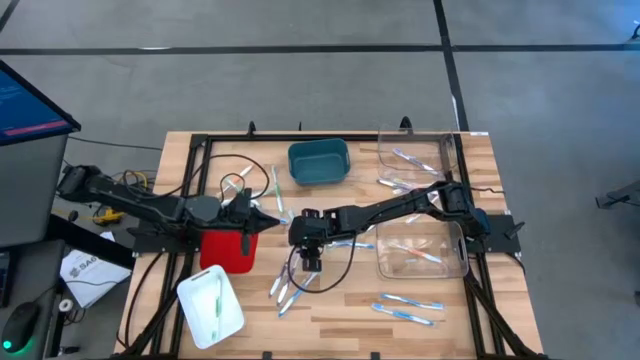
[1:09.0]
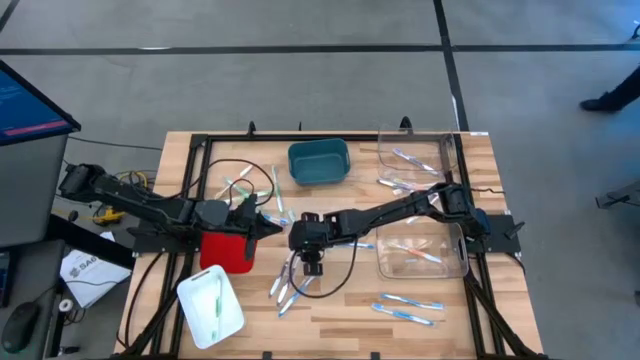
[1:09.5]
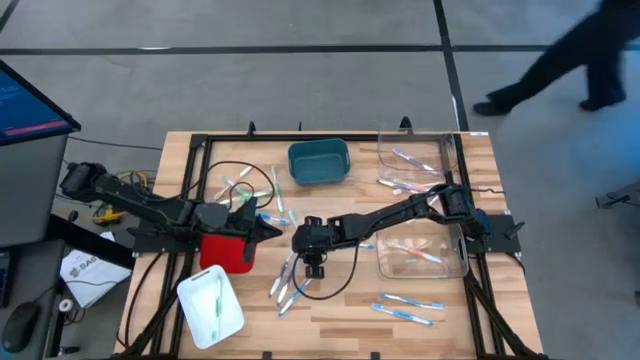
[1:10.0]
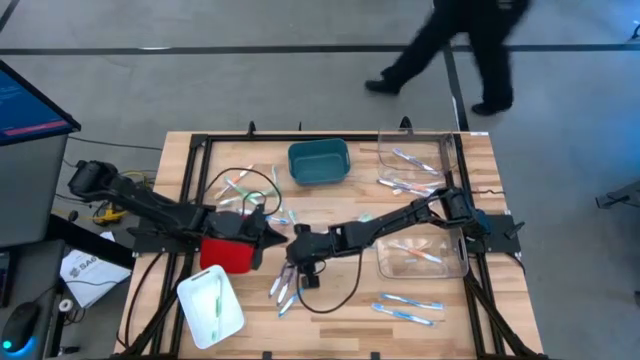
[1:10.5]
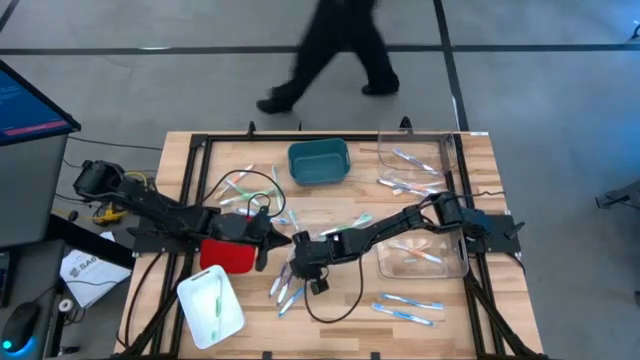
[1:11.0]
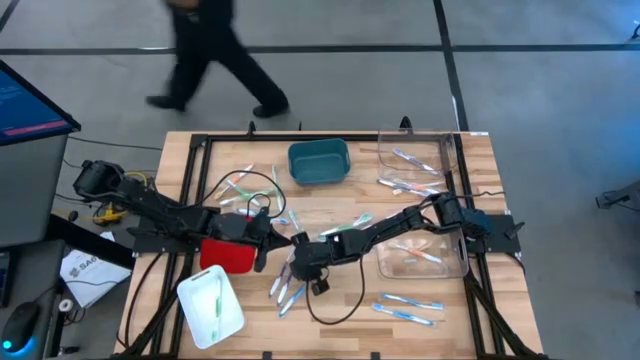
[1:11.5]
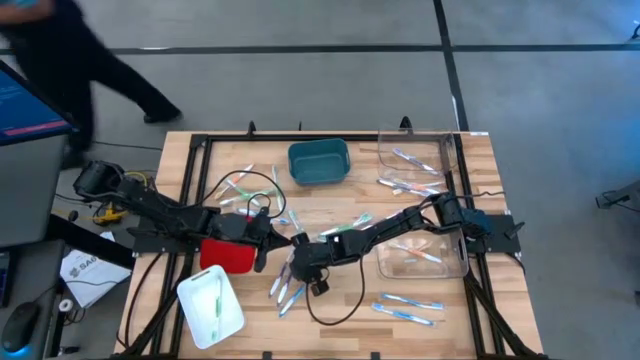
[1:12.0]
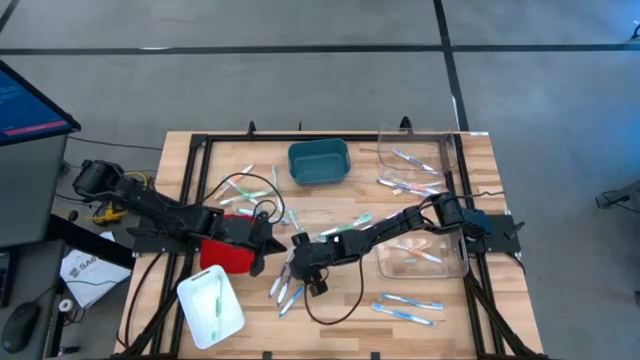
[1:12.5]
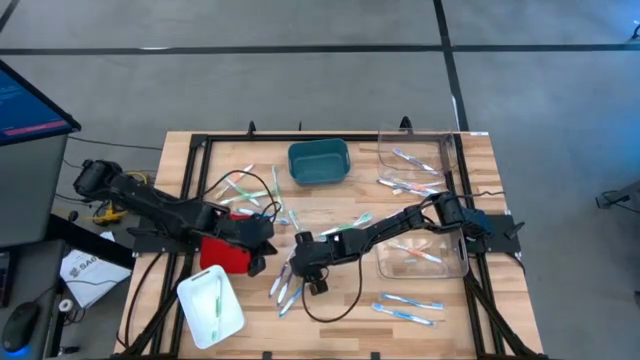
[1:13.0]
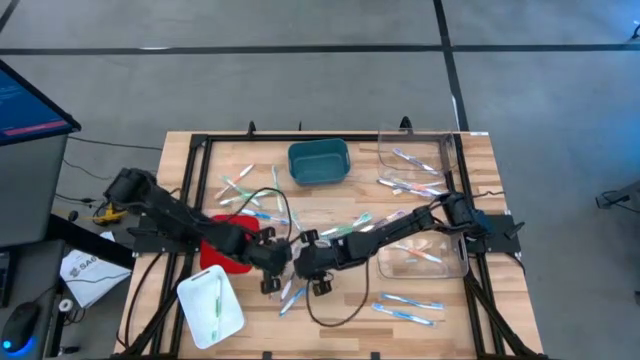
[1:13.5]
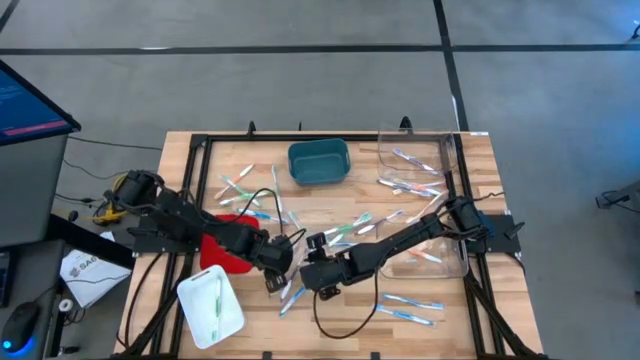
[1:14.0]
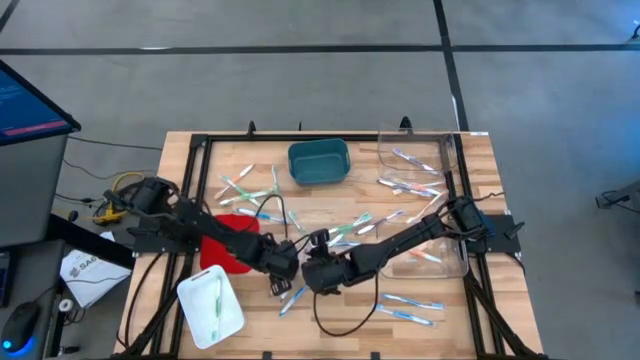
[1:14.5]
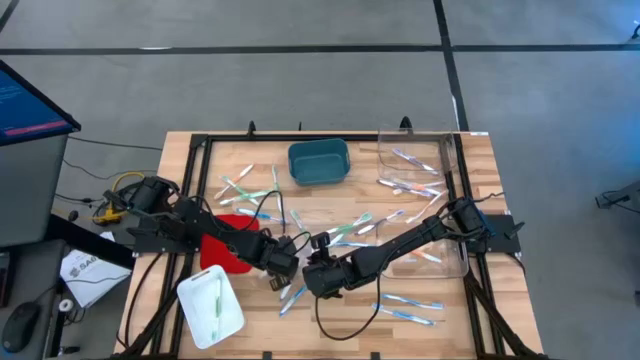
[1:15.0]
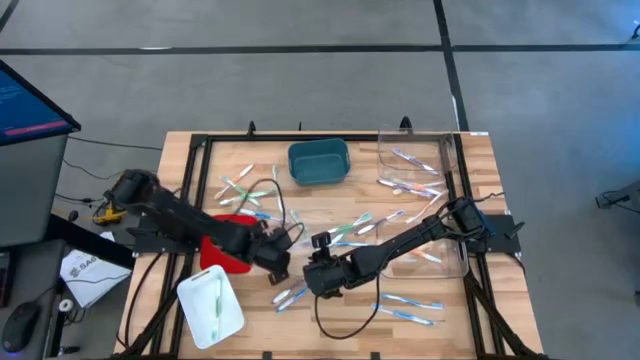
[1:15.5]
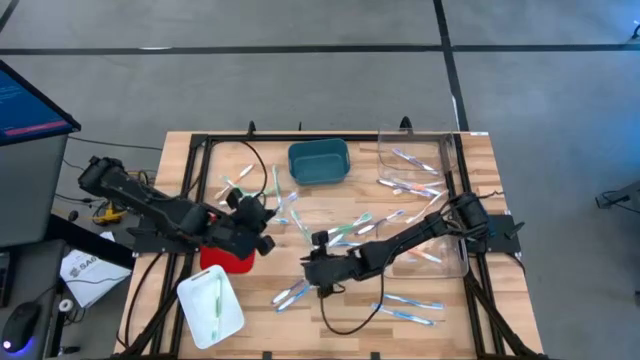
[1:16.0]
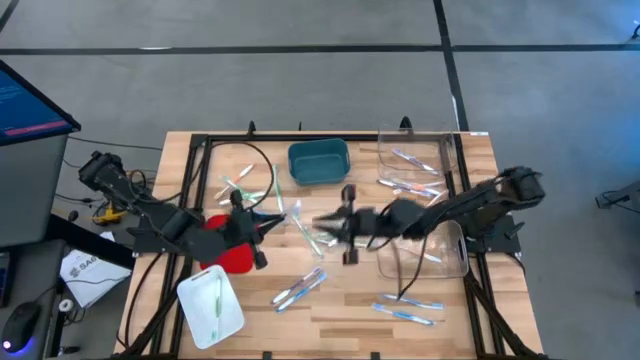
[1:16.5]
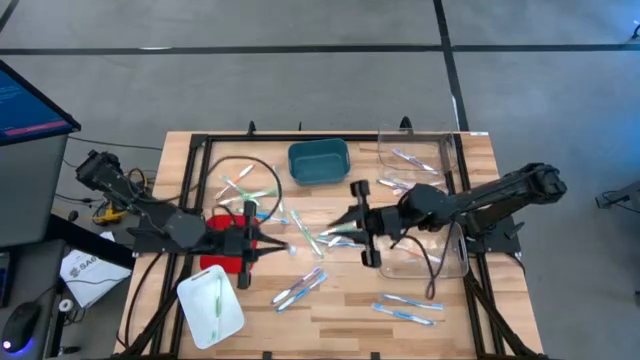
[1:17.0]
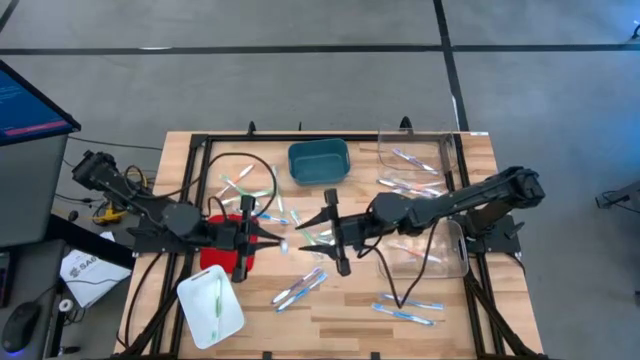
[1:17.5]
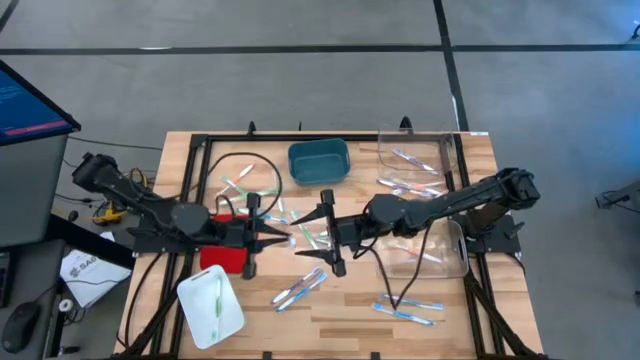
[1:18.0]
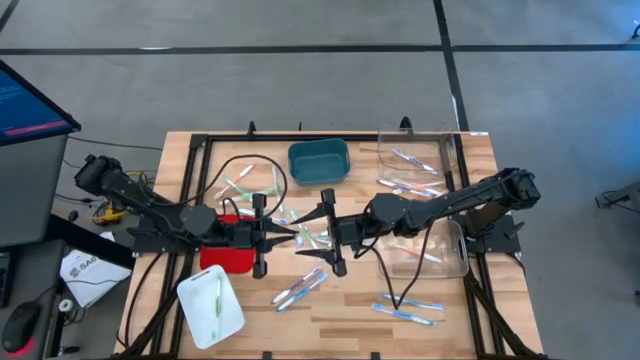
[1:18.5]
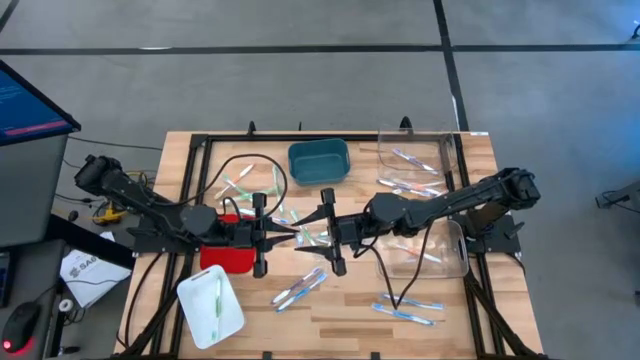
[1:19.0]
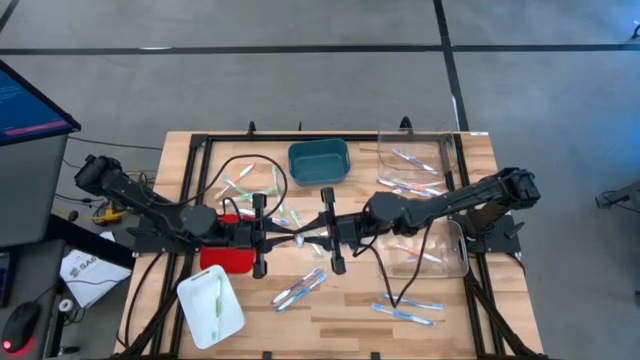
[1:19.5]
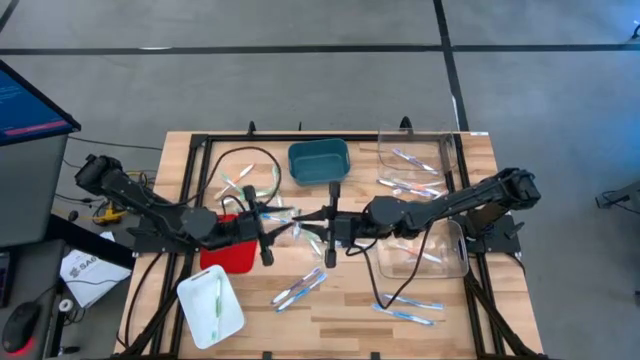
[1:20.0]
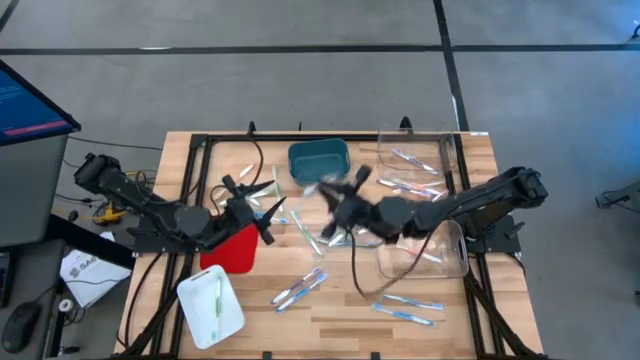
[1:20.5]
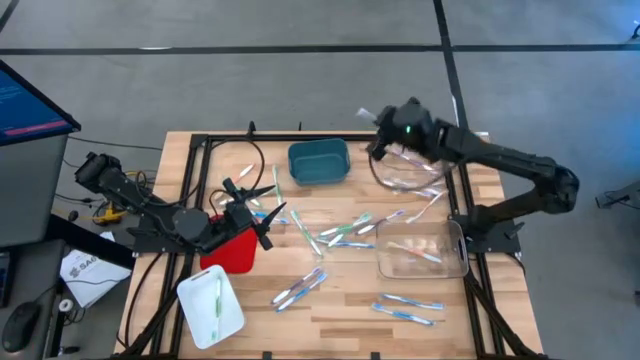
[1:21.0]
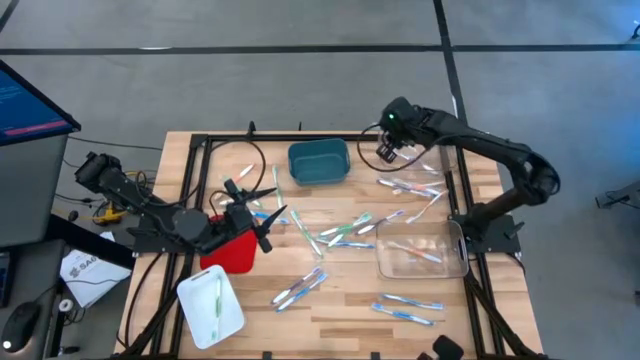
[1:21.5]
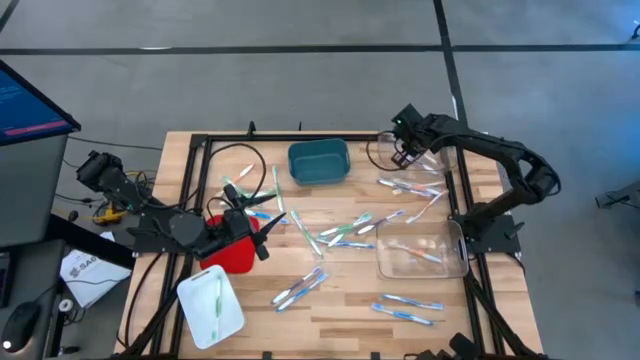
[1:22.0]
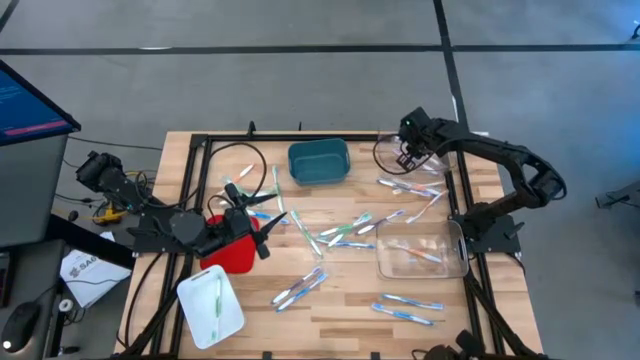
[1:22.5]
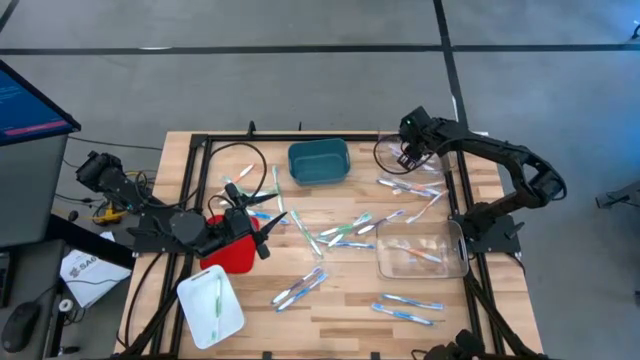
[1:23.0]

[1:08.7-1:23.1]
Task: Pick & Place Toothbrushes
Put the purple toothbrush into the top transparent bin

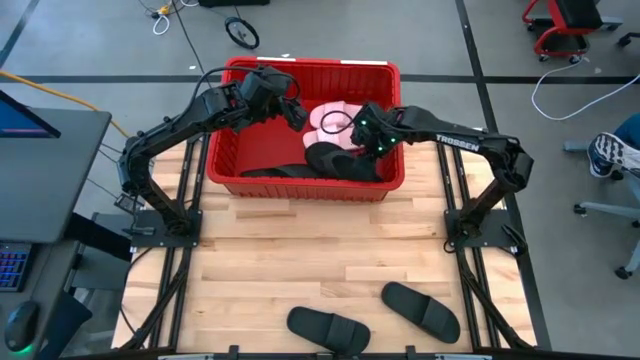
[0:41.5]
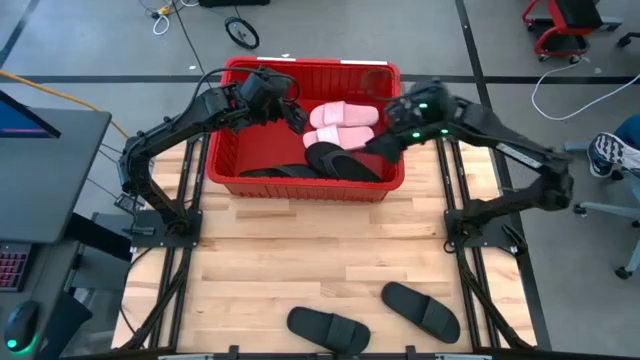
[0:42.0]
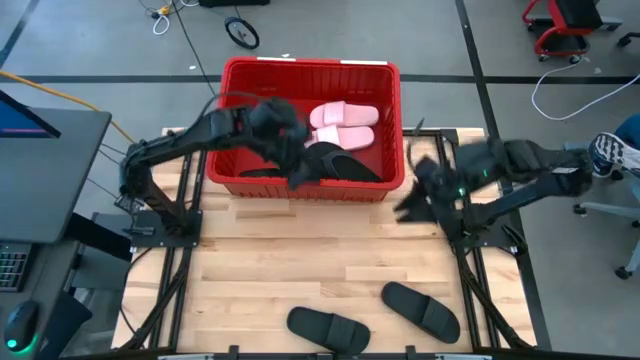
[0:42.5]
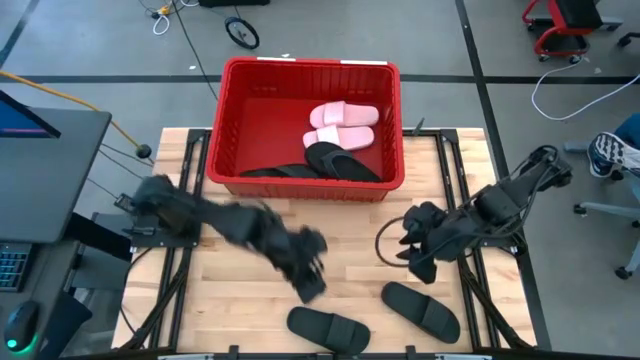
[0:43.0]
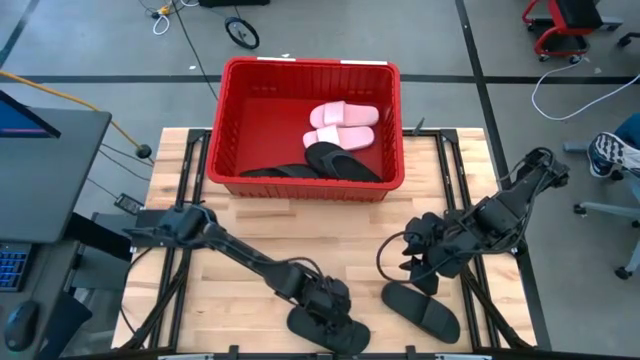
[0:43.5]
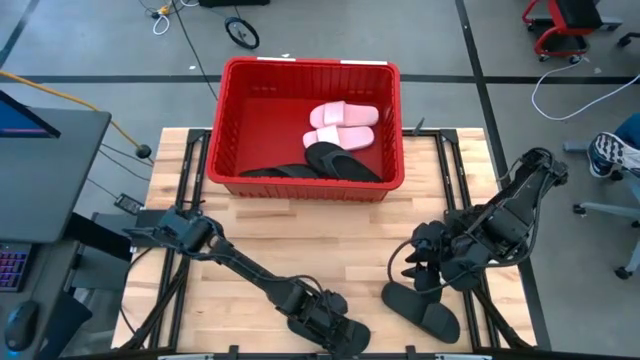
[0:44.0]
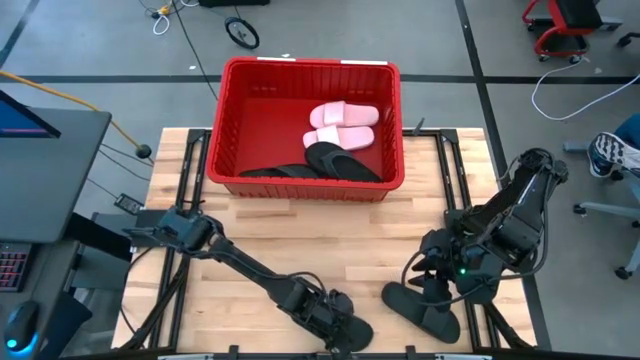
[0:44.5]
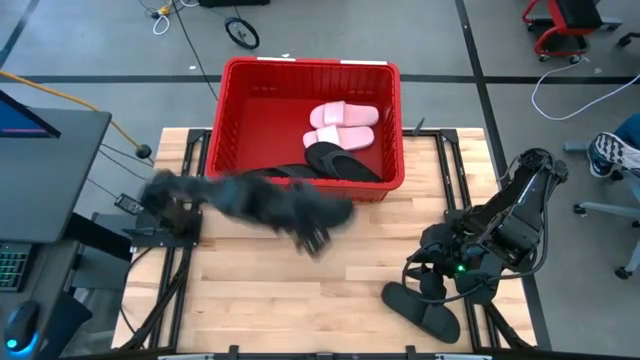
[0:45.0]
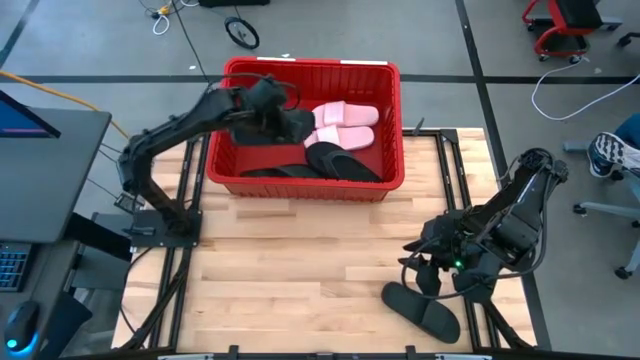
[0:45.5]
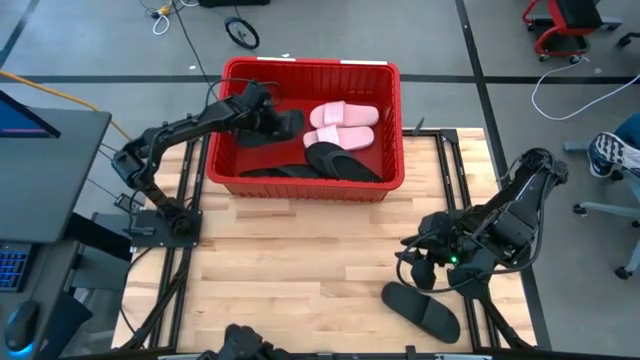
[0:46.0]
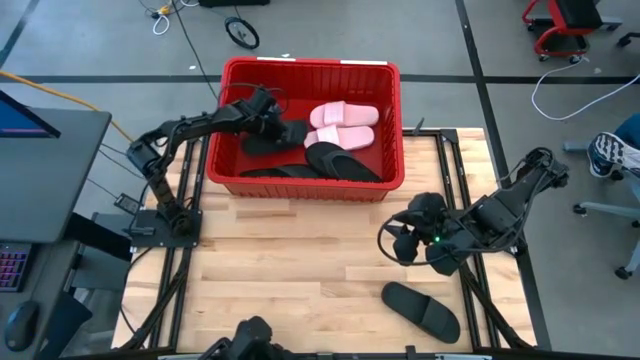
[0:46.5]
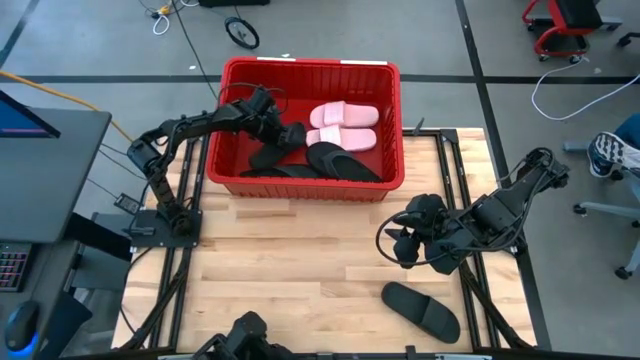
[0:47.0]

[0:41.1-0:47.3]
Task: Pick and place slides into bin
Put the black slide into the red bin

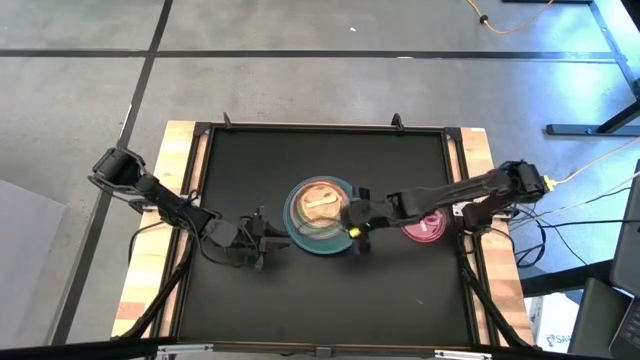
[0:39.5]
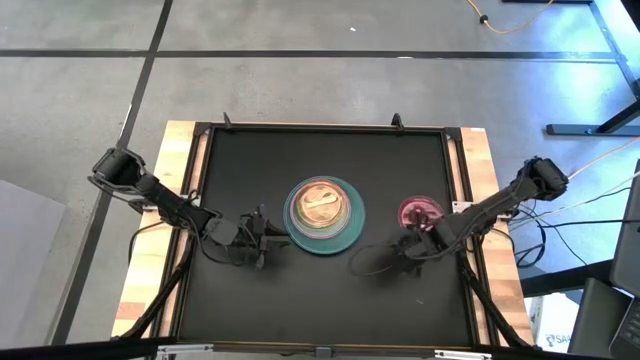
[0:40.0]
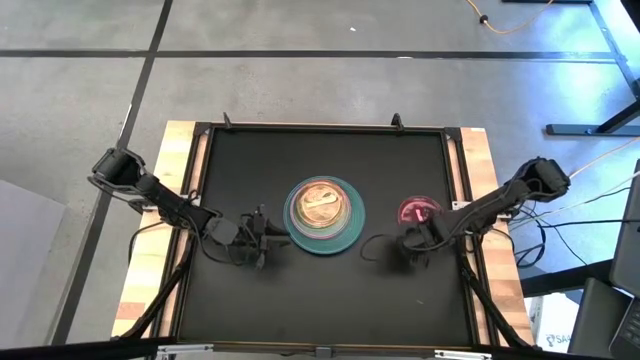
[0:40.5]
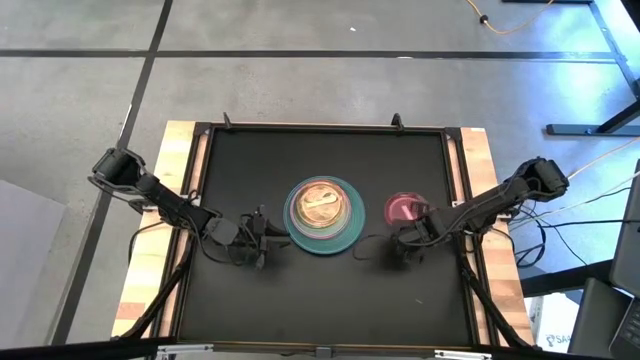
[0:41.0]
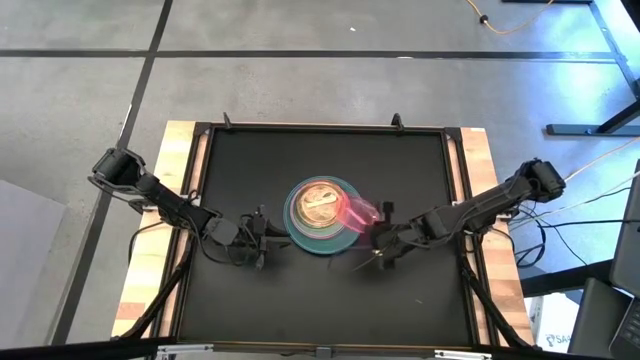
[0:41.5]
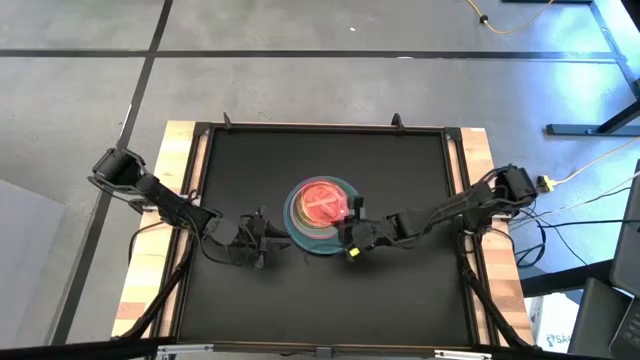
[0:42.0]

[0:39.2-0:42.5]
Task: Stack plastic plates
Stack the transparent red plate on top of the transparent orange plate
